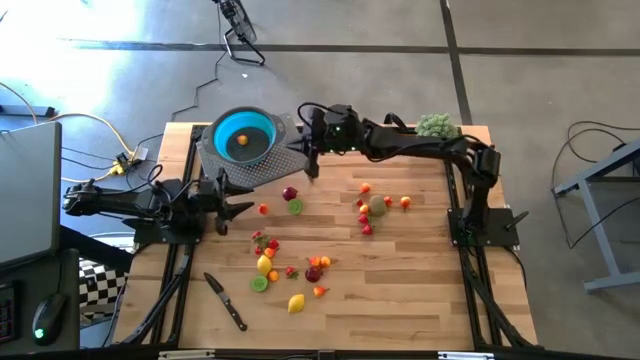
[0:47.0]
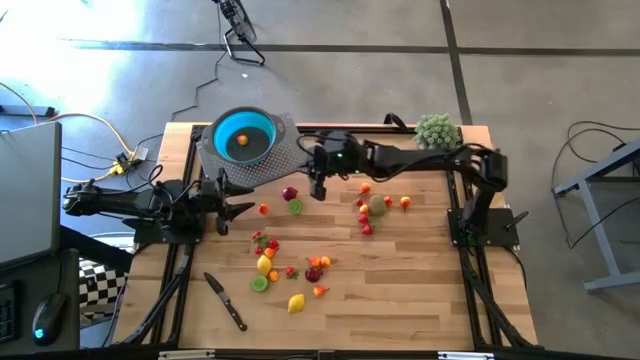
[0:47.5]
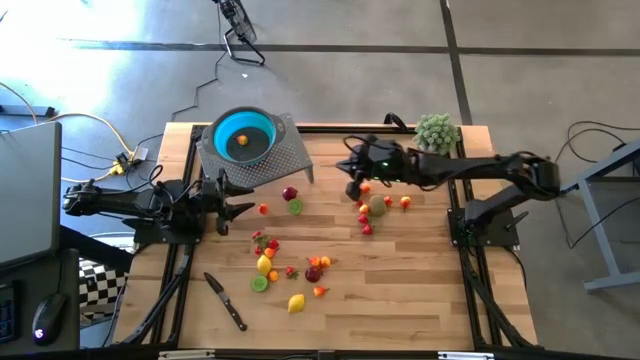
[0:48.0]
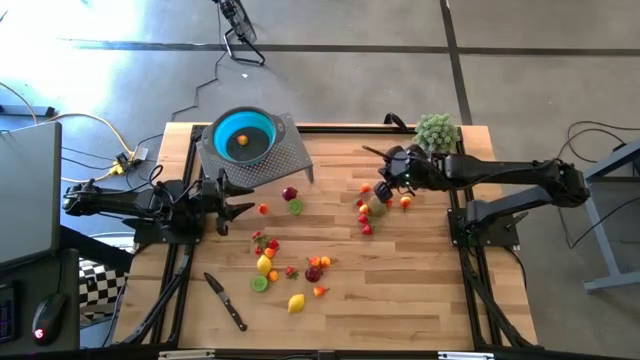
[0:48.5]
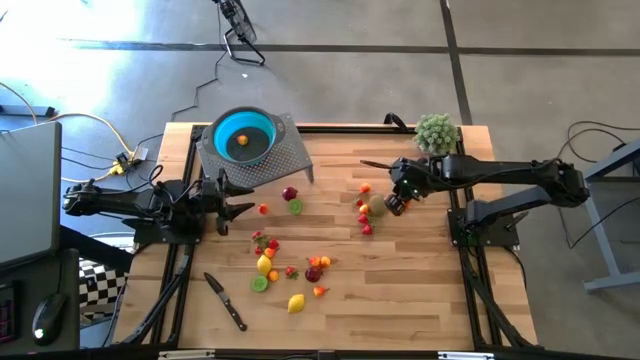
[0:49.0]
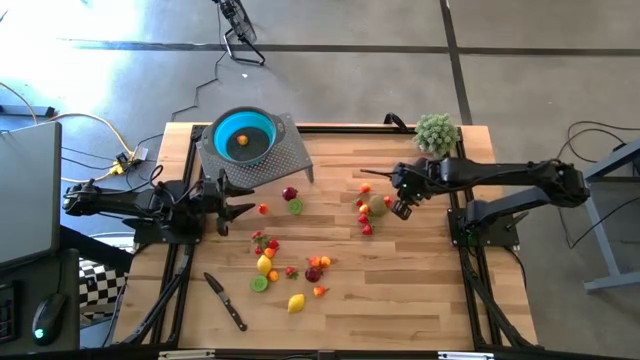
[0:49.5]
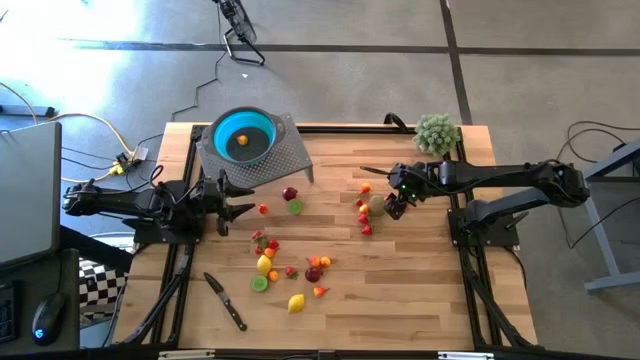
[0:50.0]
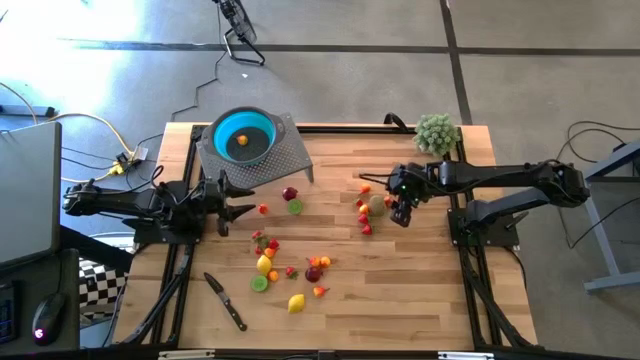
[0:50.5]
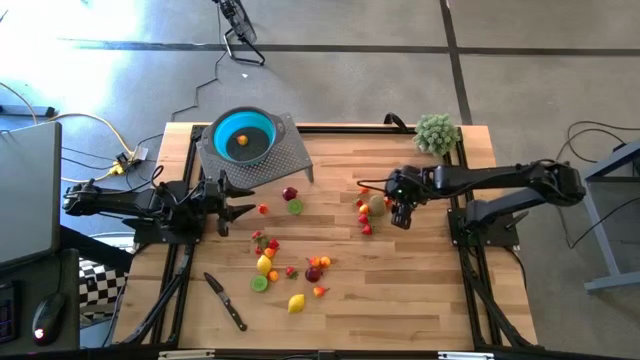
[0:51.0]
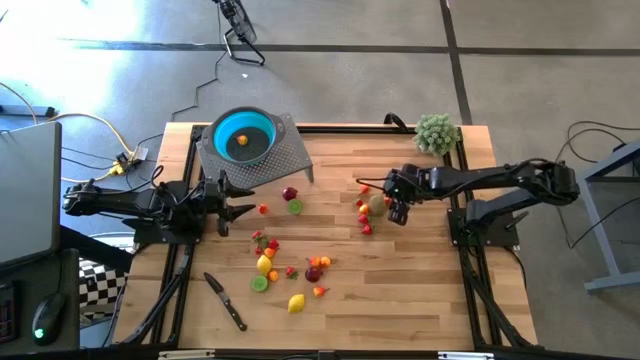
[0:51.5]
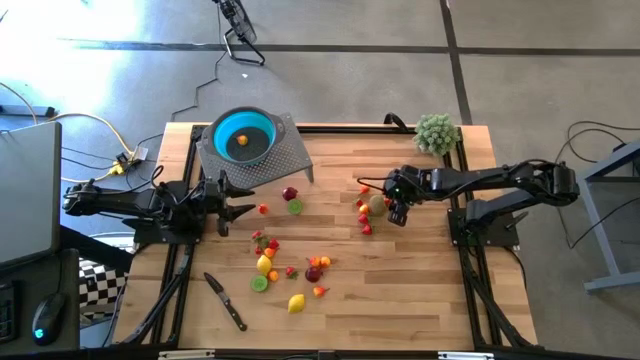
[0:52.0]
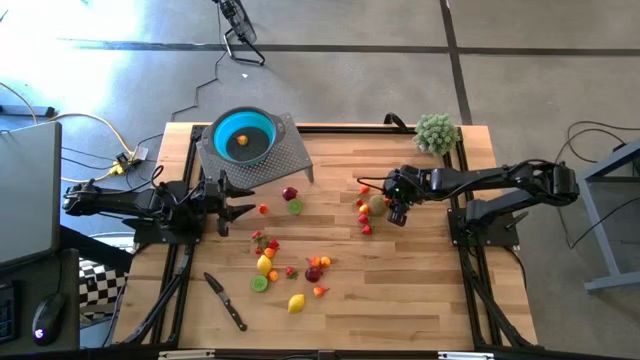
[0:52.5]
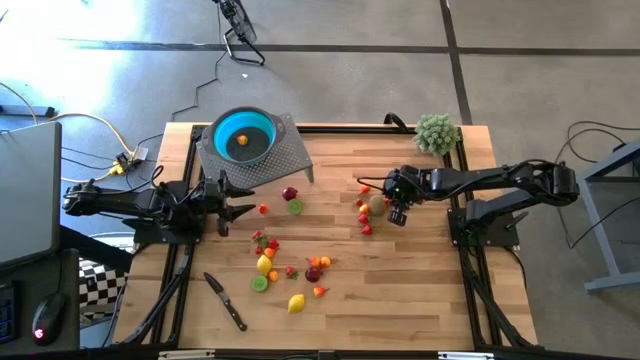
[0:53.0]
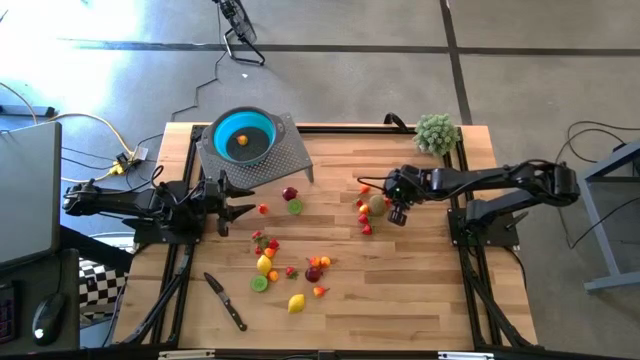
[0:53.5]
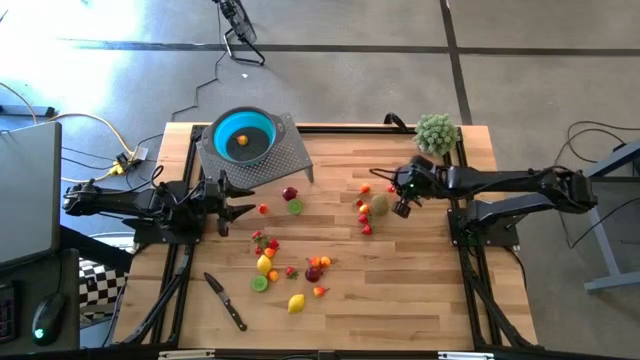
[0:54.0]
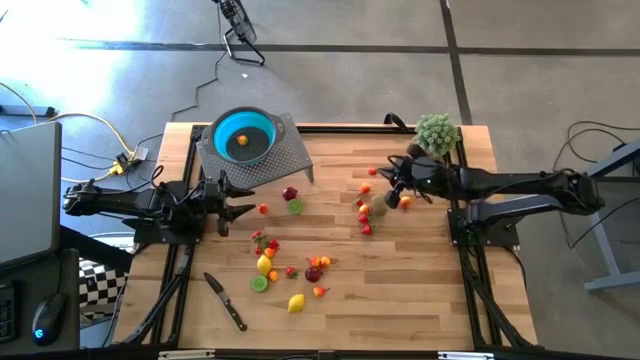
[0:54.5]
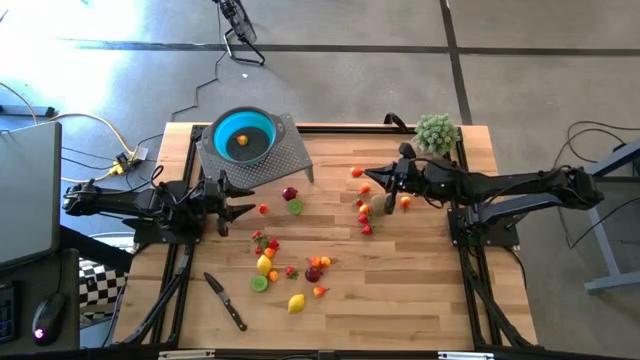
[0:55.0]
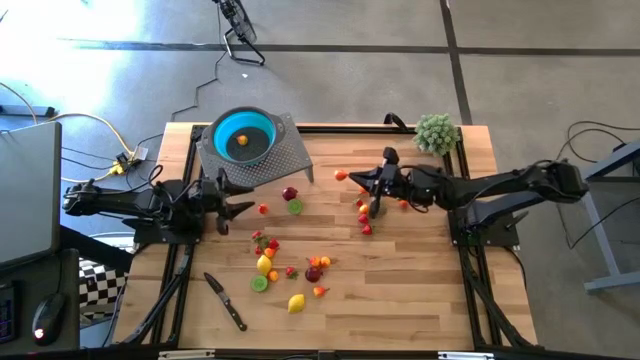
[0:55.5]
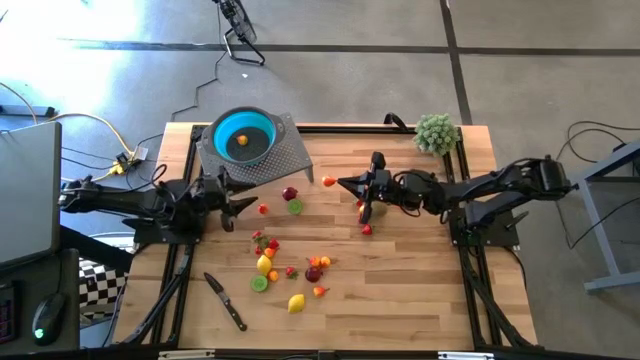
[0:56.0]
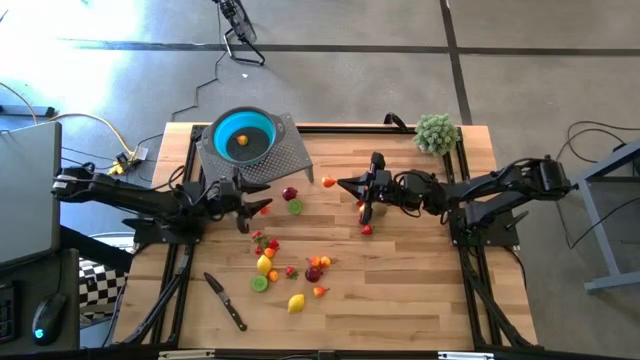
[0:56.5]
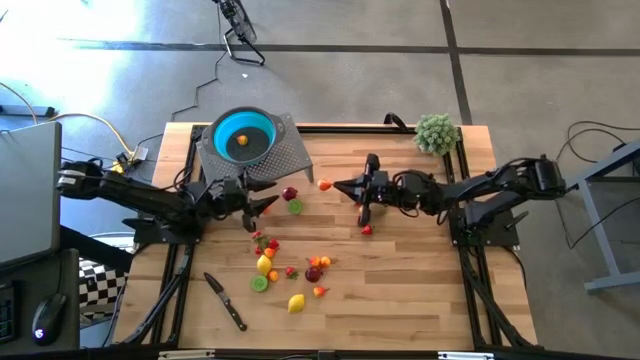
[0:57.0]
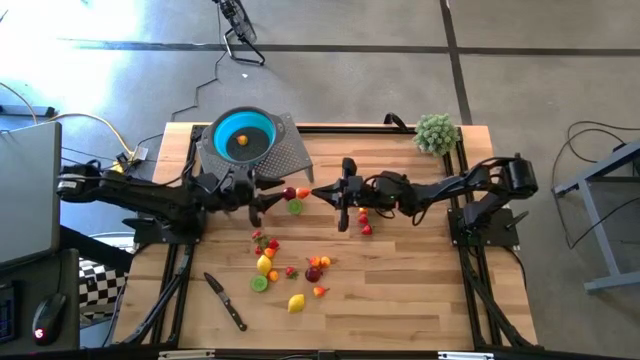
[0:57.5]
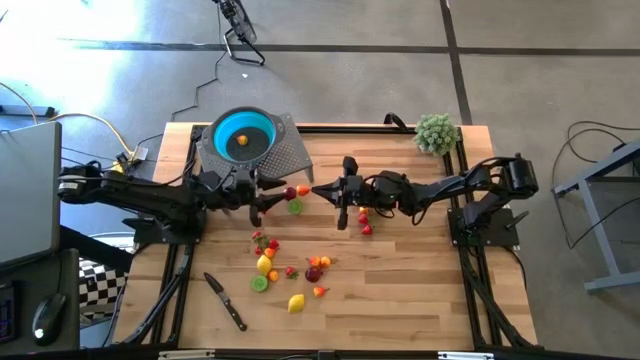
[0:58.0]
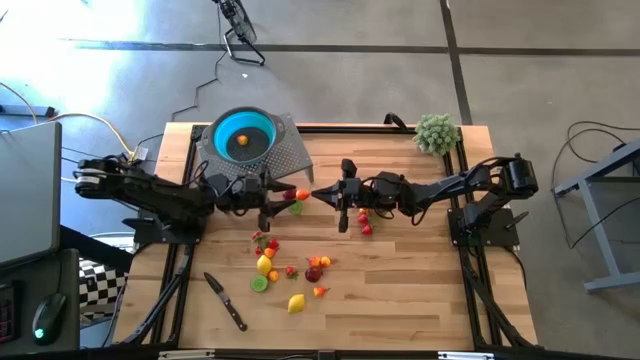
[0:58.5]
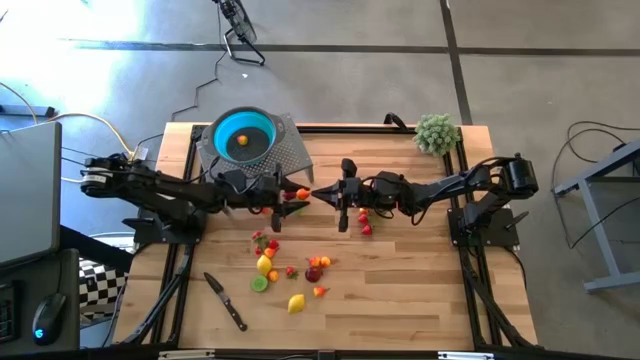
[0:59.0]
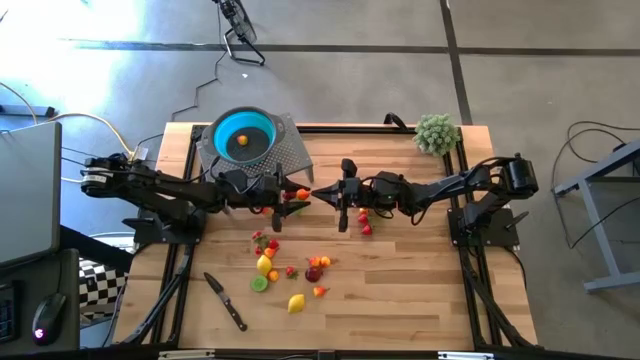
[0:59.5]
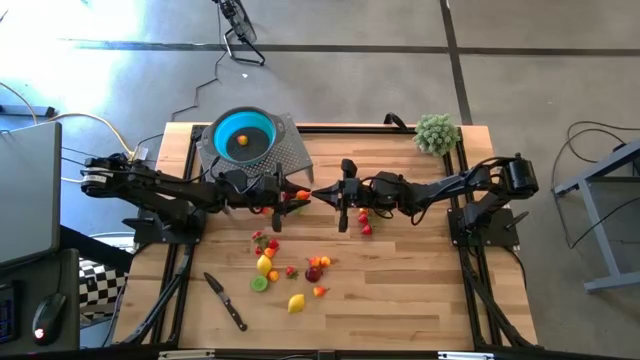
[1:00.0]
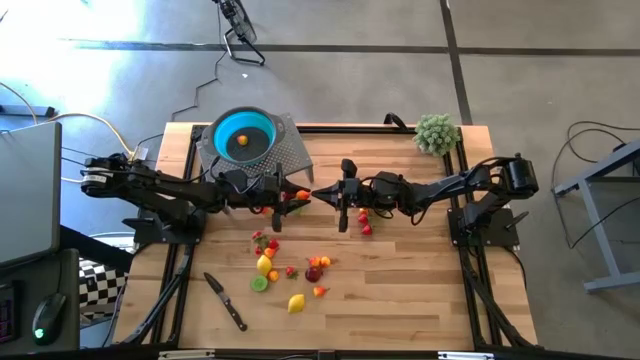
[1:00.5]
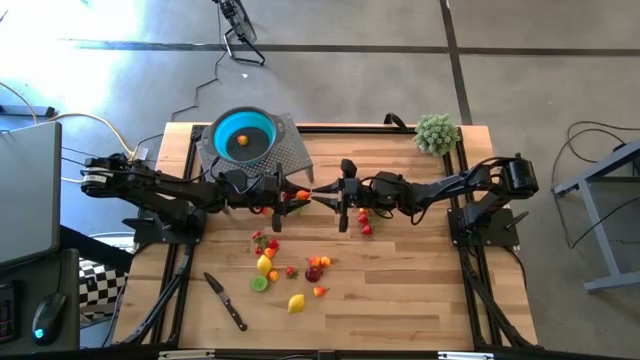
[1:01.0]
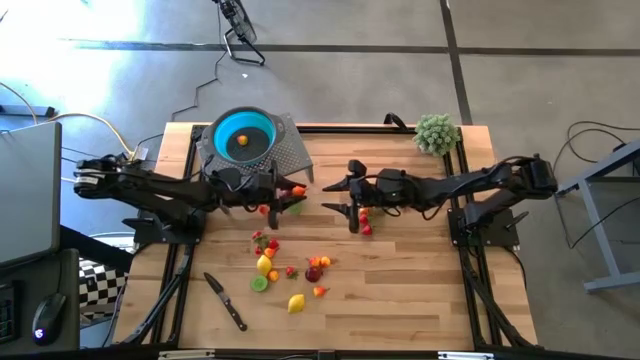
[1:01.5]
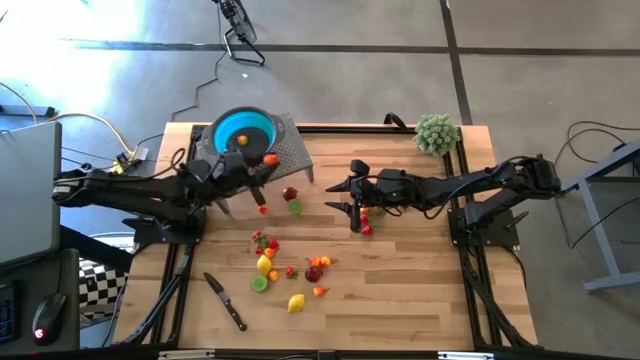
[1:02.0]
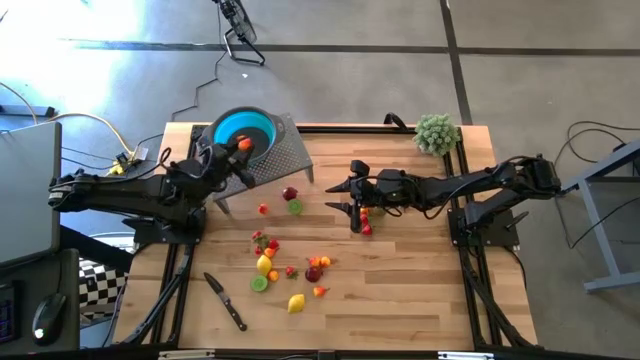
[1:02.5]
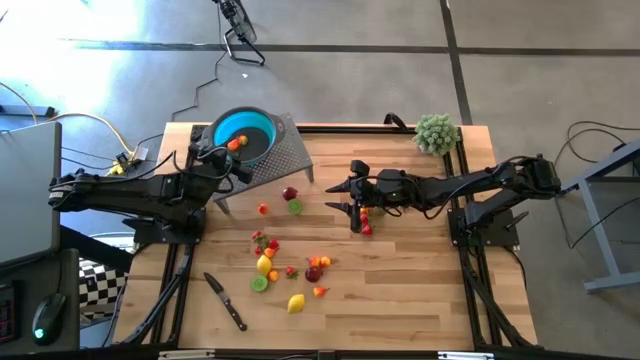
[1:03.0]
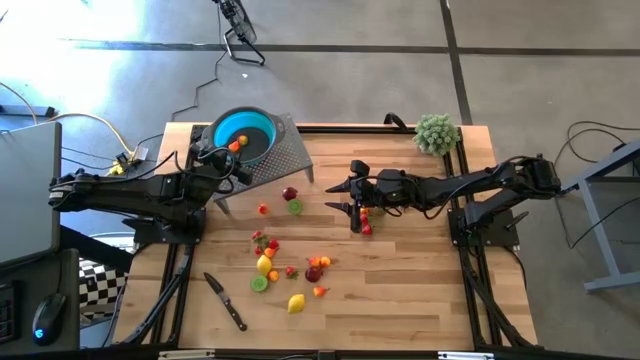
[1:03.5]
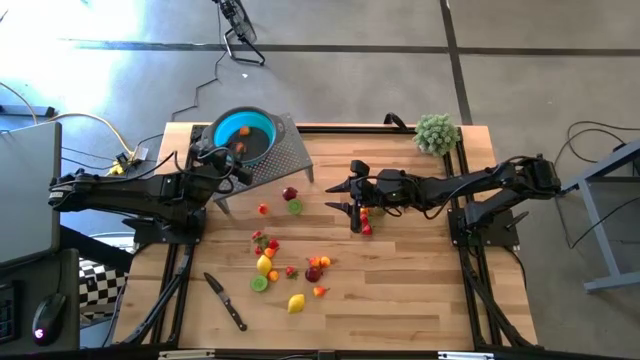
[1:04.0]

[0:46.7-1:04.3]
Task: Pick & Place Fruit
Put the orange pear into the blue strainer bowl on the shelf

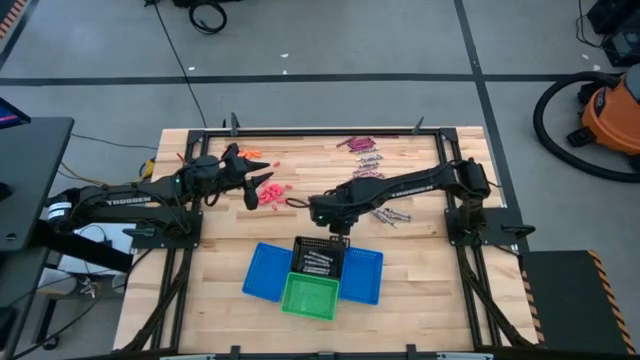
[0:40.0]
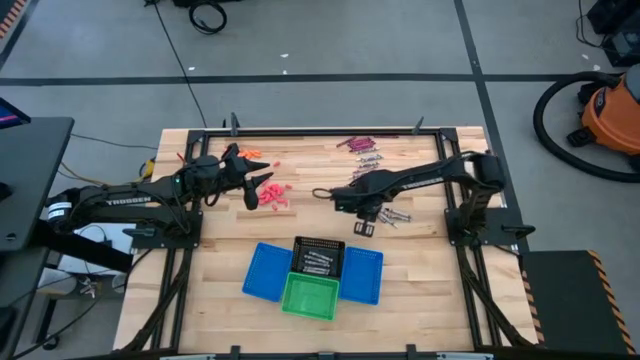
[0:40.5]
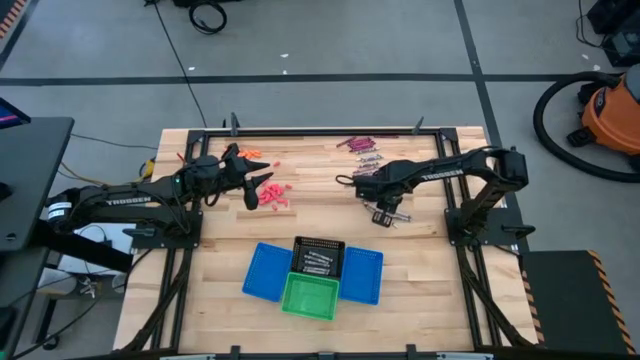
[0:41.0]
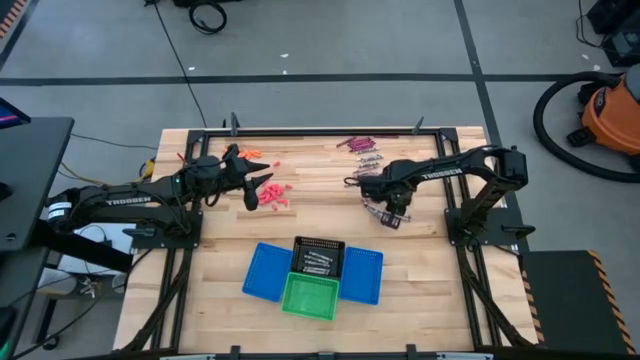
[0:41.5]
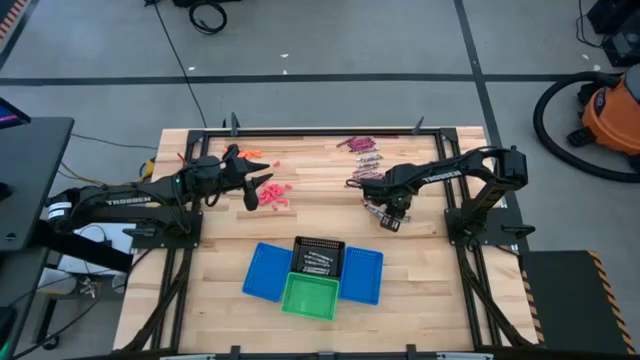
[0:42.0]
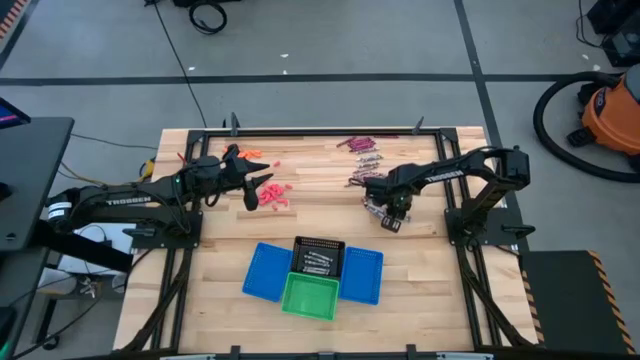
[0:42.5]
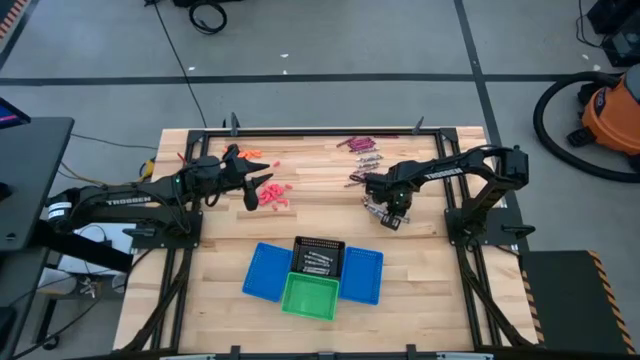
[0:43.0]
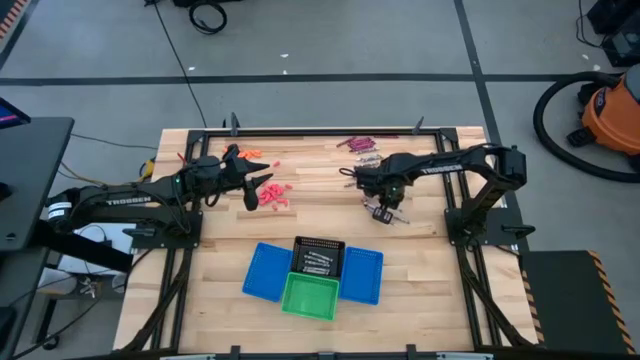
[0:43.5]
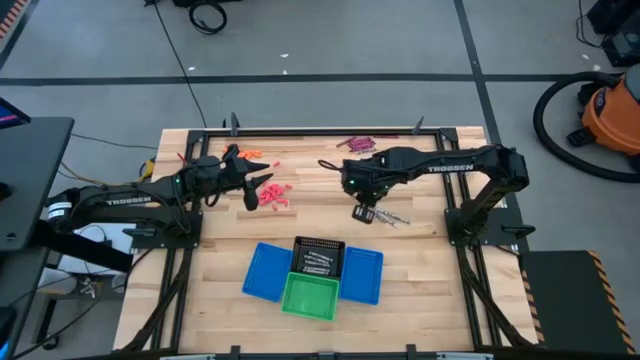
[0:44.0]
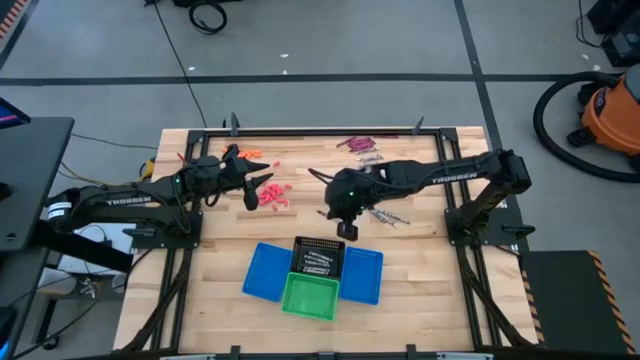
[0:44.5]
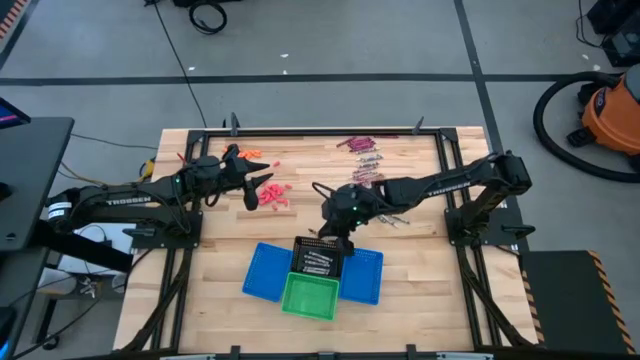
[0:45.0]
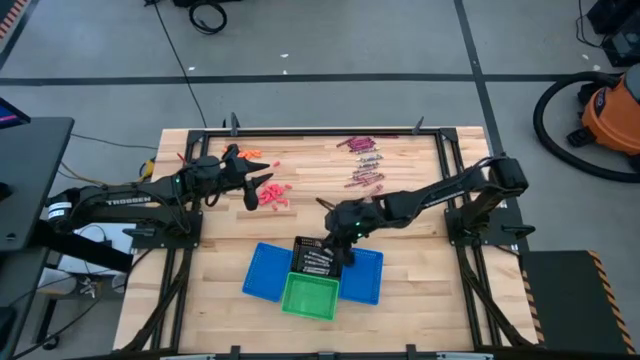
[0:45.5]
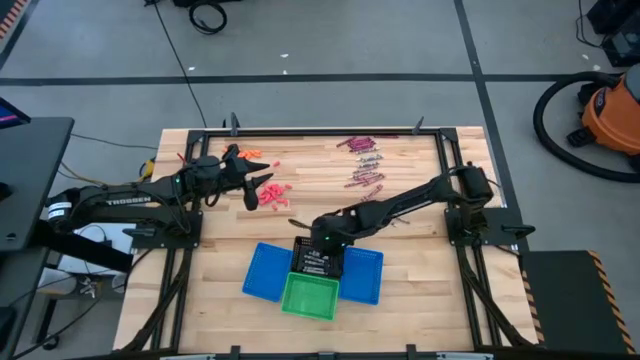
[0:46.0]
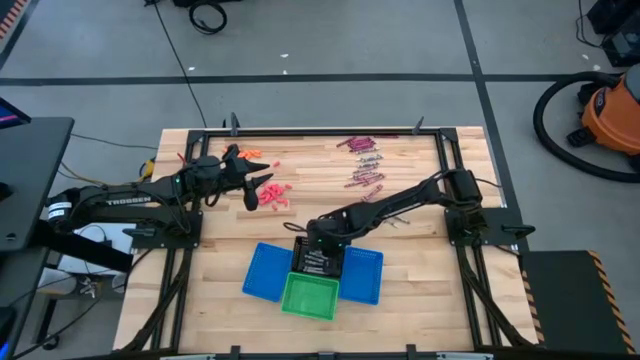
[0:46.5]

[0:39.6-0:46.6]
Task: Sort crayons
Put the black crayon into the black bin
